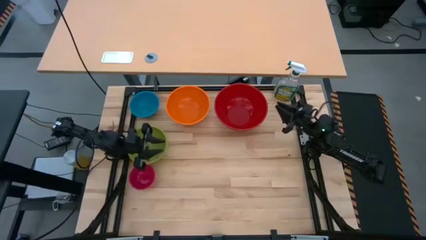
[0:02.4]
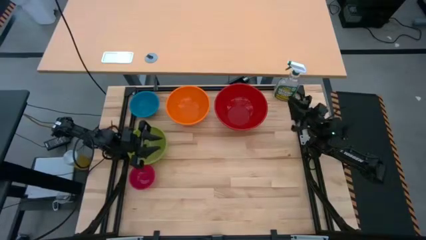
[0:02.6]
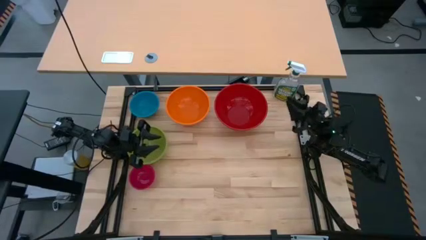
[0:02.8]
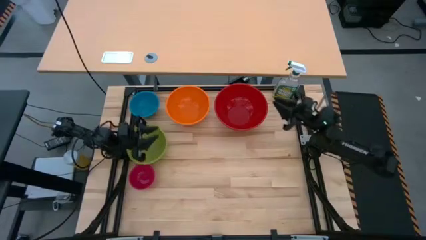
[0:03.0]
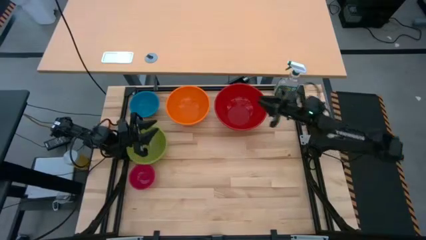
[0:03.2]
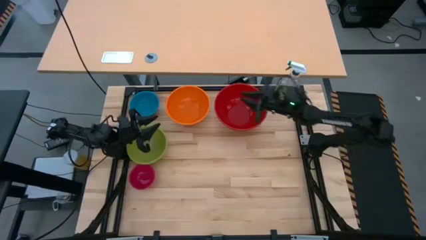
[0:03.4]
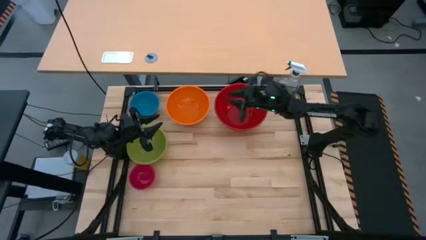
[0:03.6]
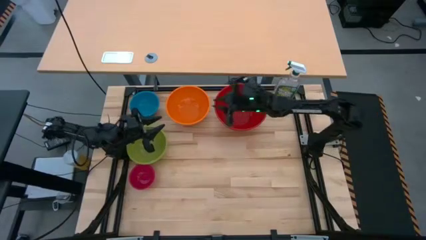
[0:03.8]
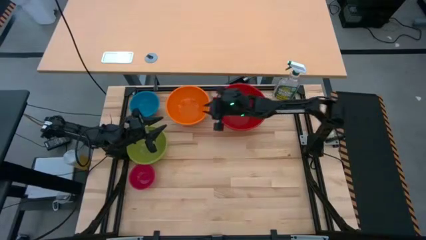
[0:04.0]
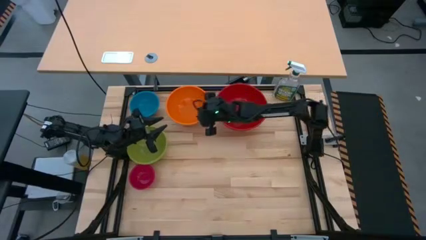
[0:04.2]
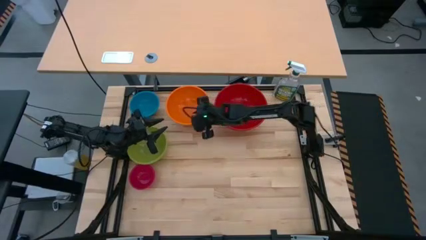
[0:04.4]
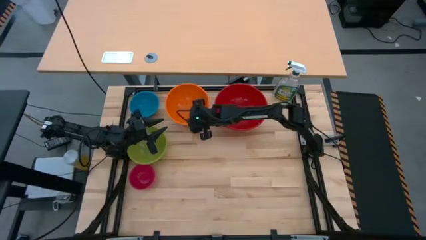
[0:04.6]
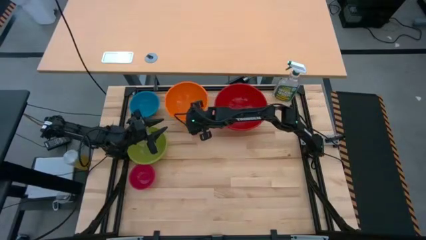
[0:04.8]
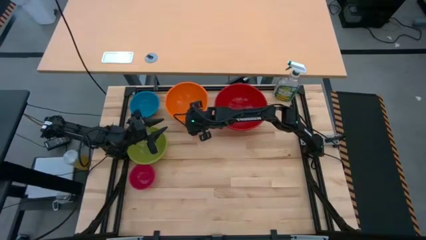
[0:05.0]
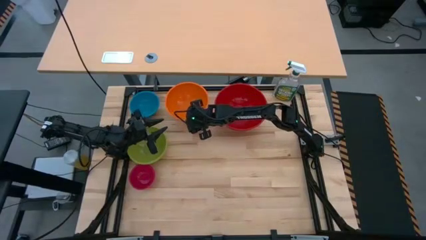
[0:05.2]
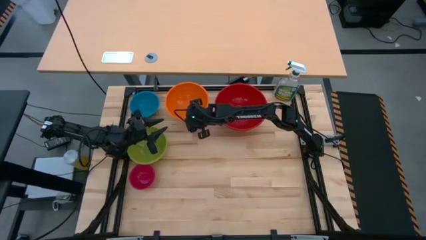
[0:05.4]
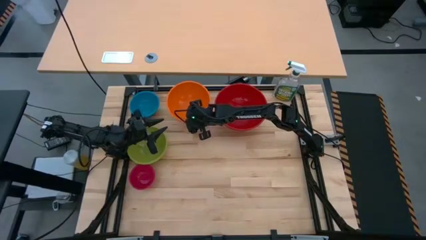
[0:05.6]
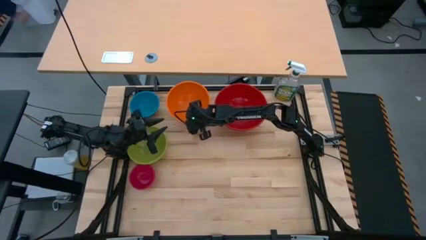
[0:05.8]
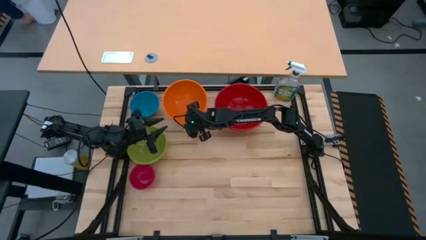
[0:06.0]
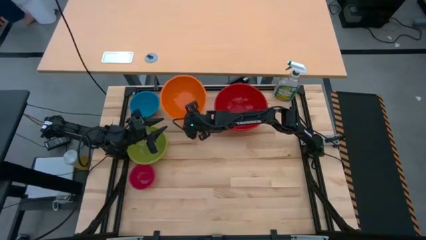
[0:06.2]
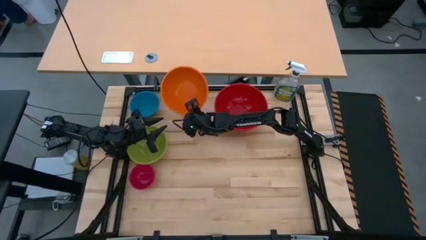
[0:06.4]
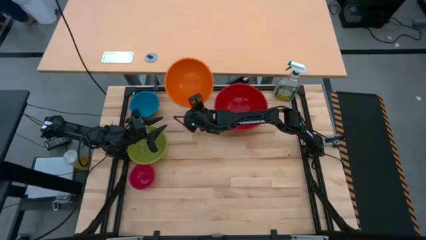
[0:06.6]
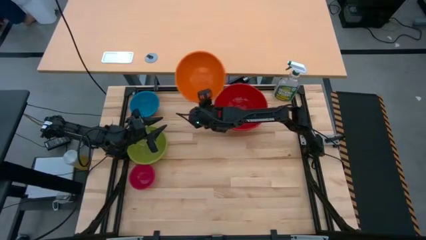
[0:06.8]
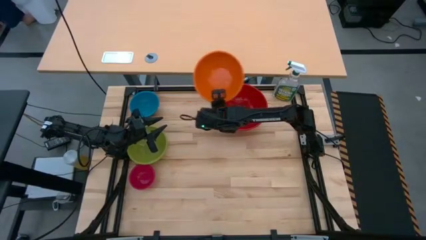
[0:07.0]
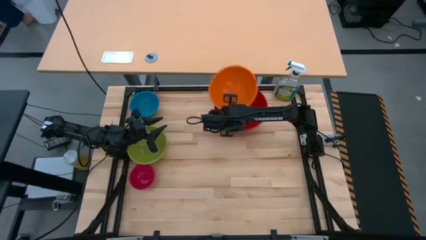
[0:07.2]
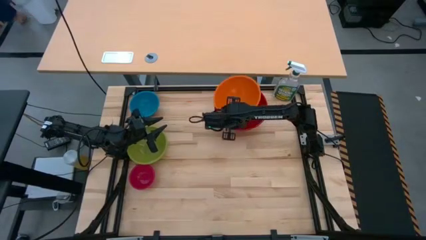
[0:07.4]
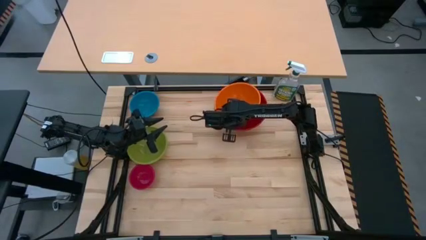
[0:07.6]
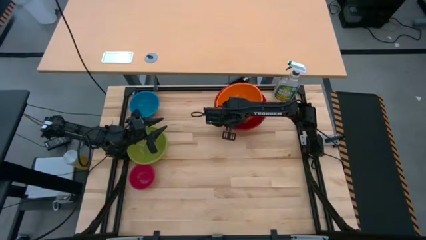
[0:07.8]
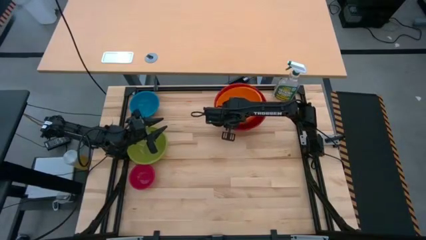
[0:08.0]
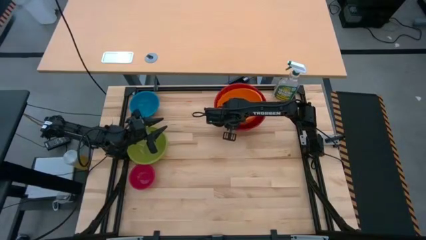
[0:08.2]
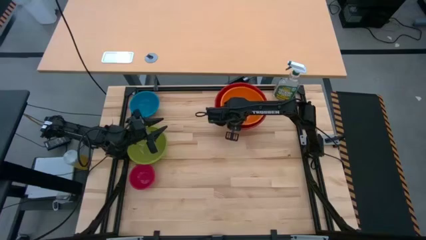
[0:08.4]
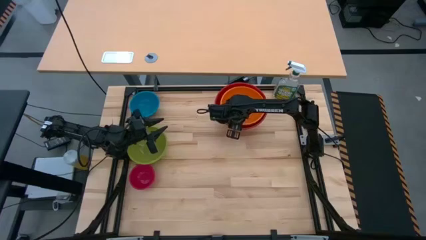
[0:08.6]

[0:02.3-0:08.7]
Stack the orange bowl on top of the red bowl

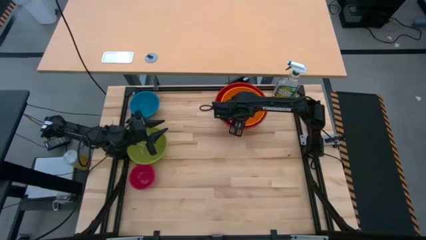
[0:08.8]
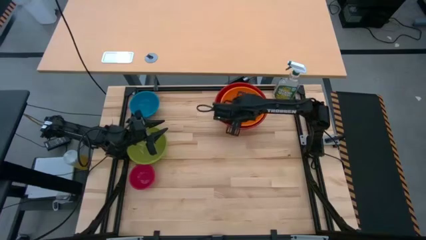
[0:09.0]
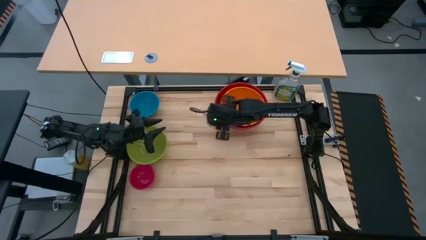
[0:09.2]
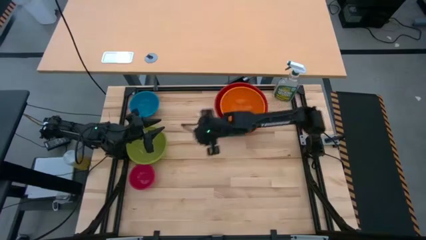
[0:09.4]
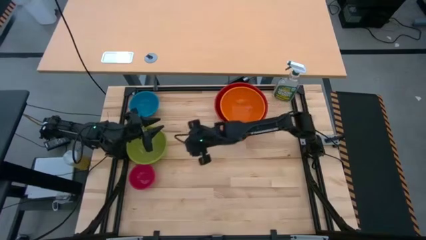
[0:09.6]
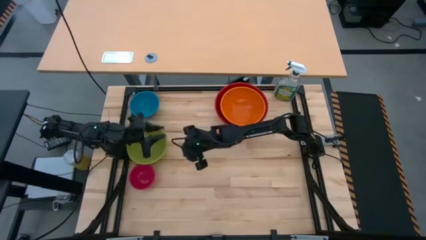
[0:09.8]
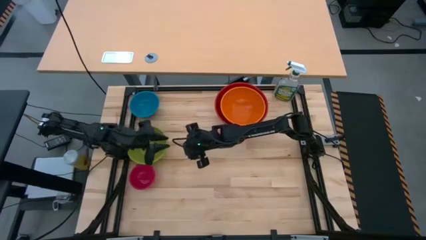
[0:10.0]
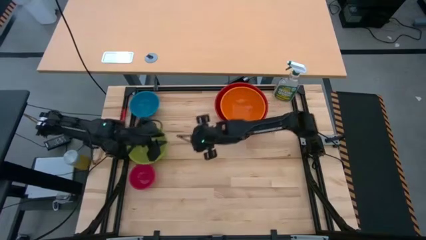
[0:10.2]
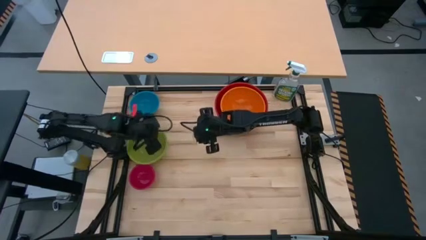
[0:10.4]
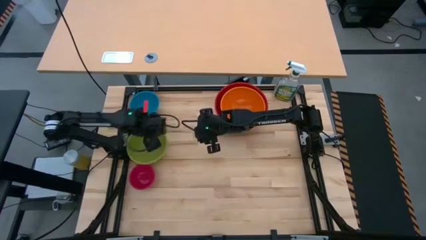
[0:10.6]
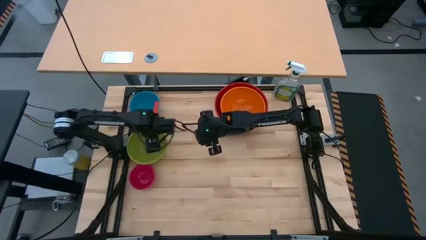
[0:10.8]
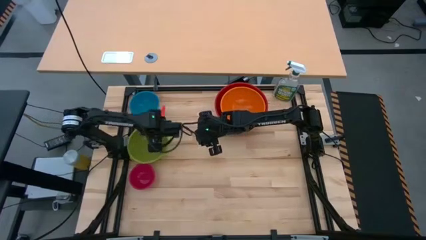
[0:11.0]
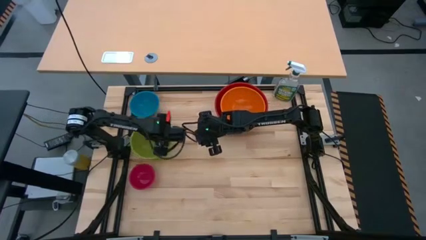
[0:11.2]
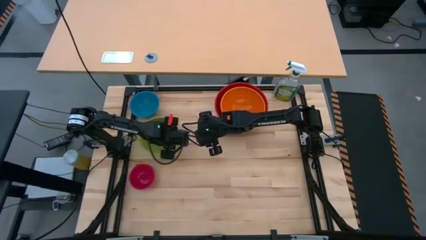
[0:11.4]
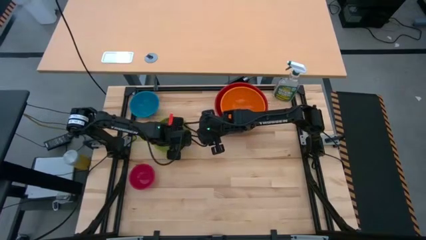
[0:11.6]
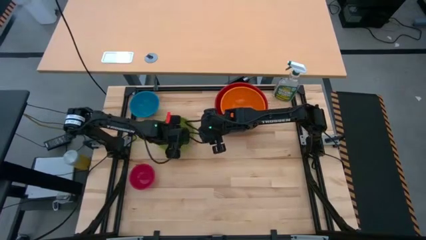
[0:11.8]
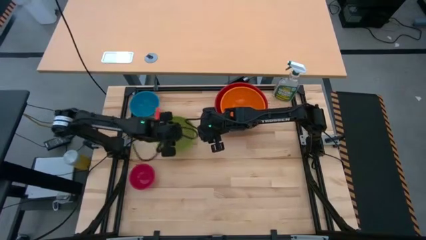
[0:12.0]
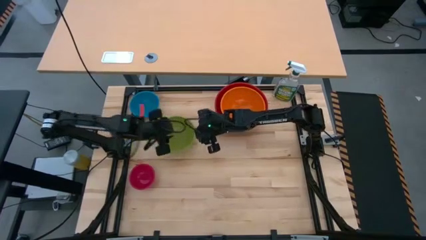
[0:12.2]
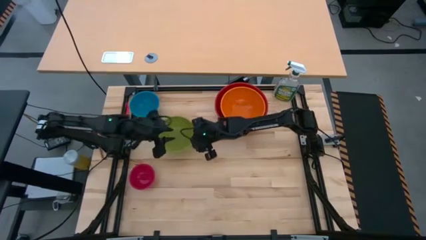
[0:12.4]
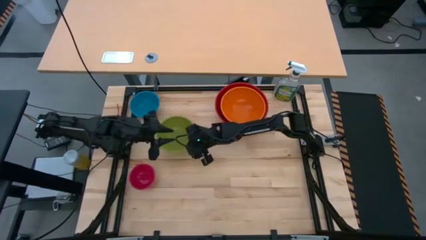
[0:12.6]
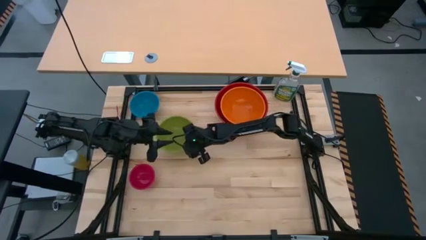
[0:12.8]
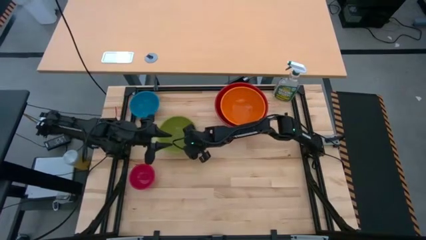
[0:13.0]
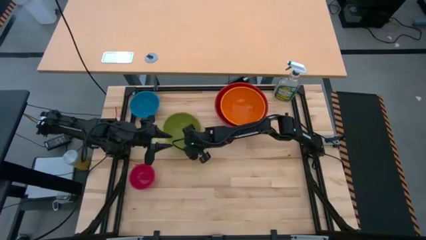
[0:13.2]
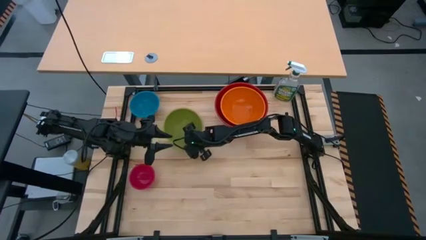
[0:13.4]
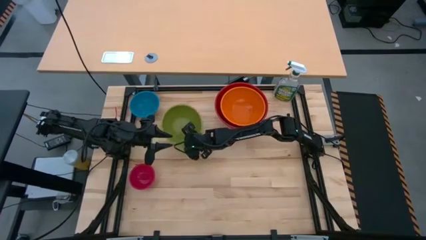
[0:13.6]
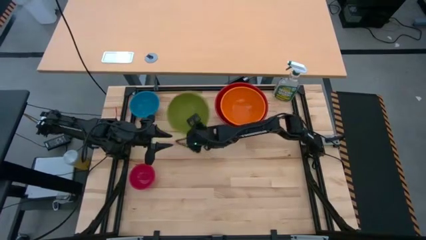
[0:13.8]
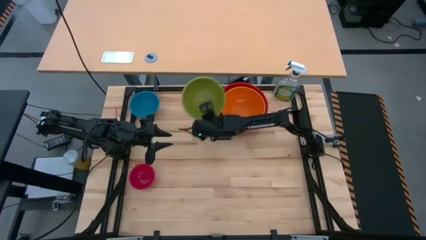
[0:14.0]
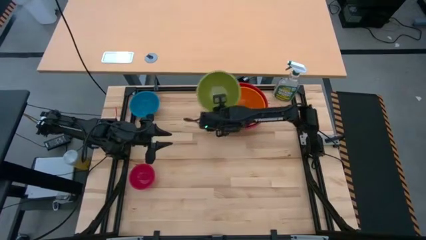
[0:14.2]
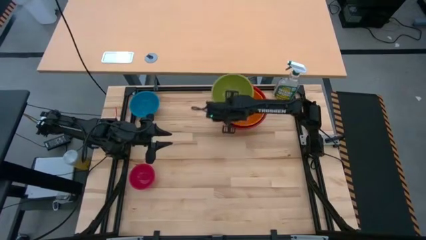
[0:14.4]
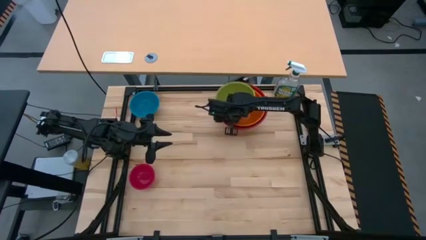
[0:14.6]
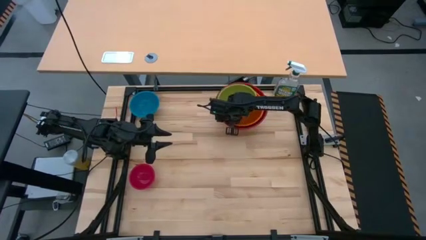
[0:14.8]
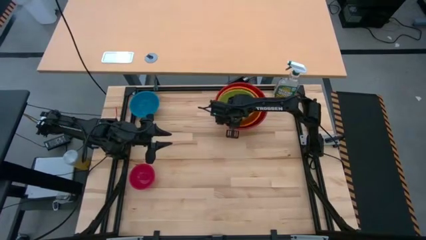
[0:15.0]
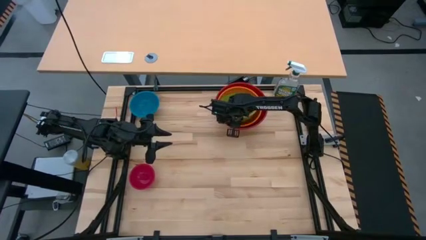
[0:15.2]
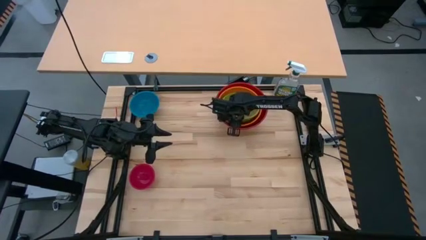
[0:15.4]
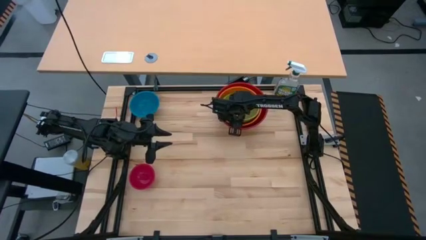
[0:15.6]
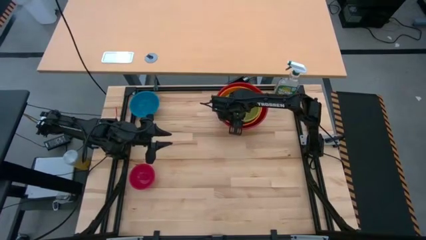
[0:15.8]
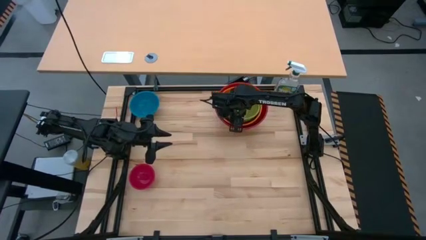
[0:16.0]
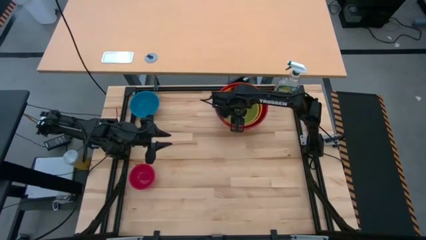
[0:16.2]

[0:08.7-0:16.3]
Stack the light green bowl on top of the orange bowl
